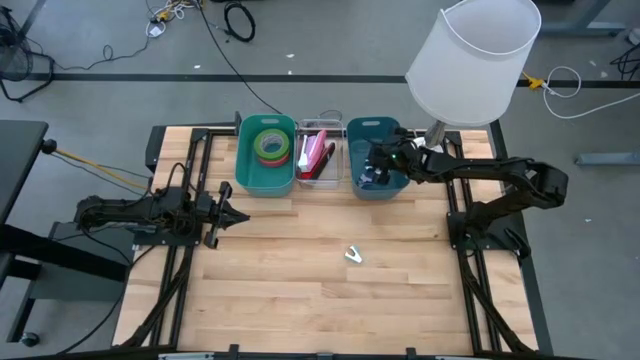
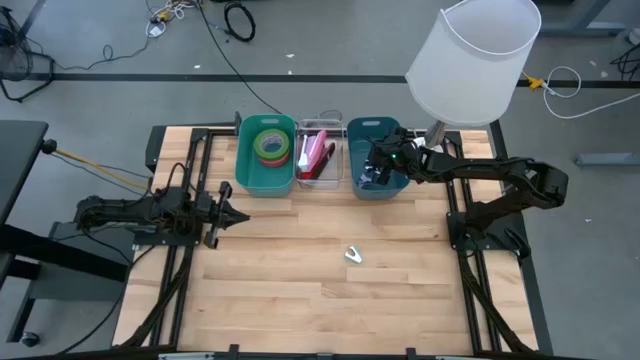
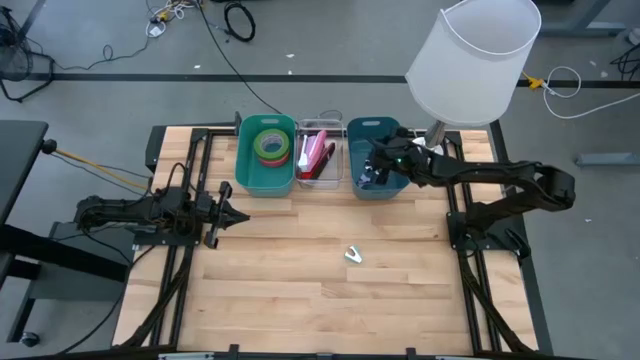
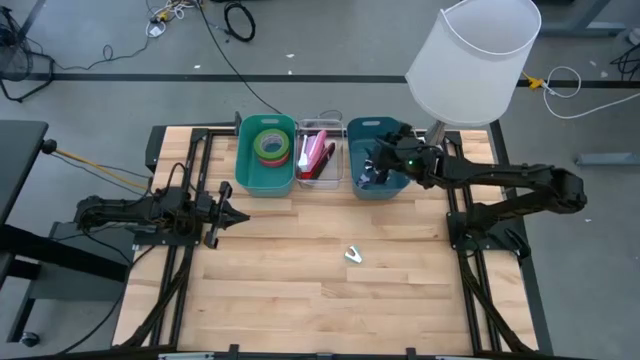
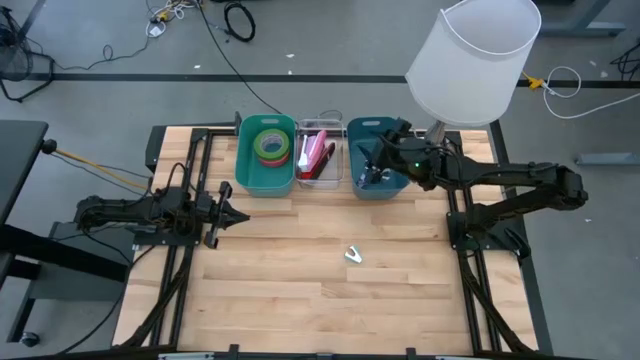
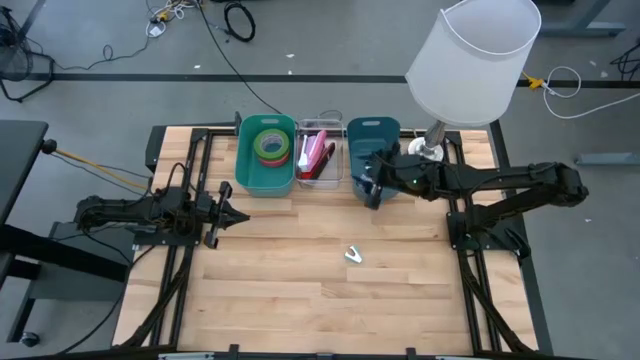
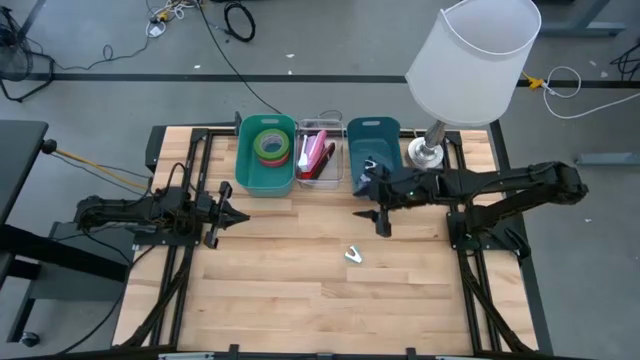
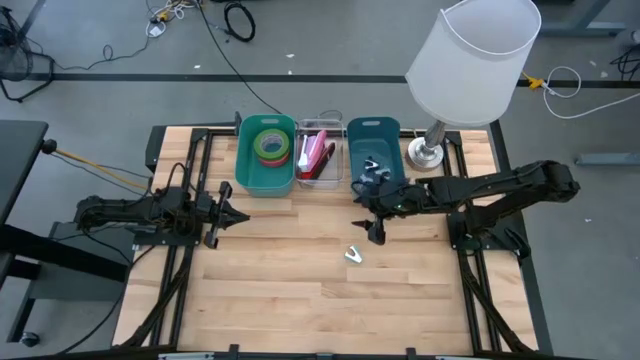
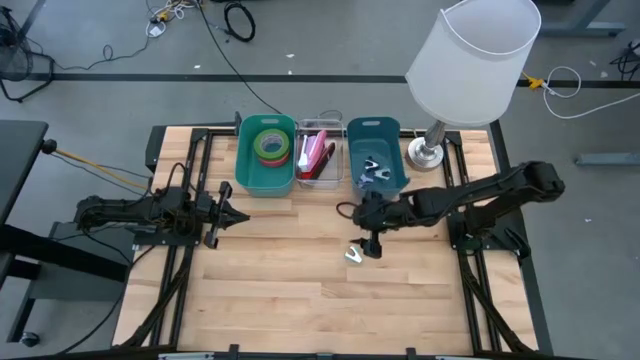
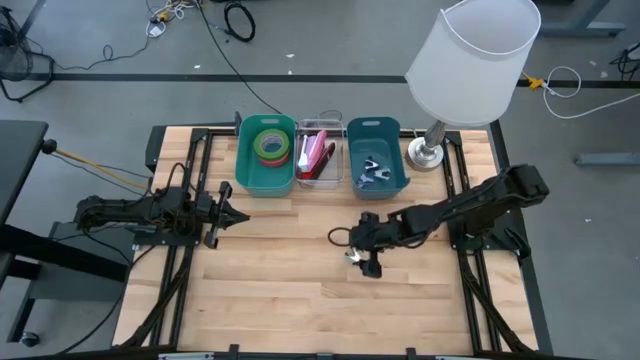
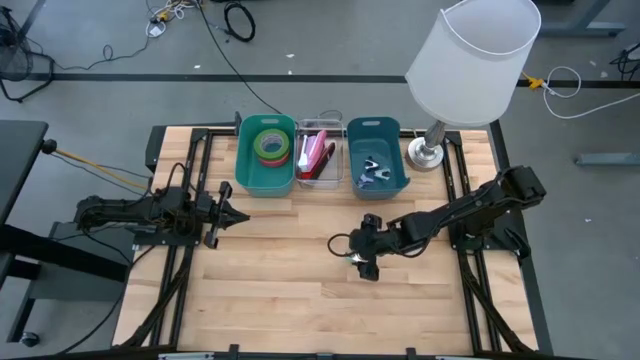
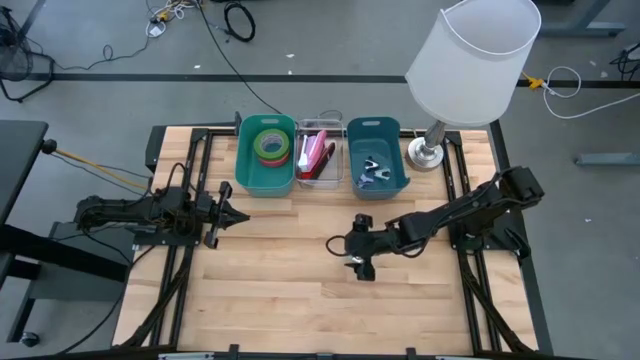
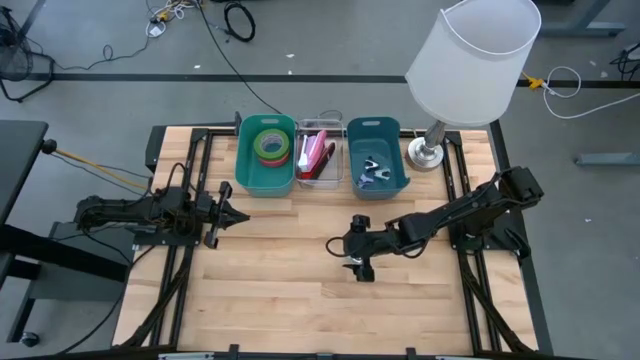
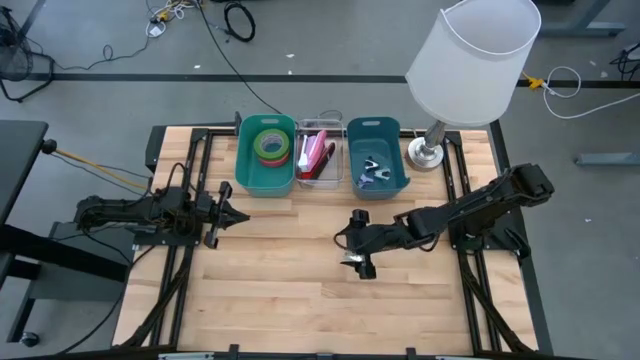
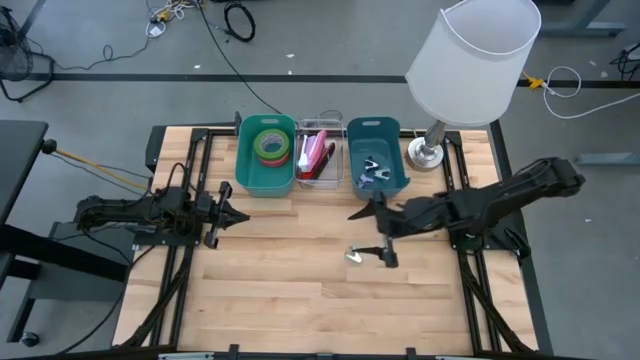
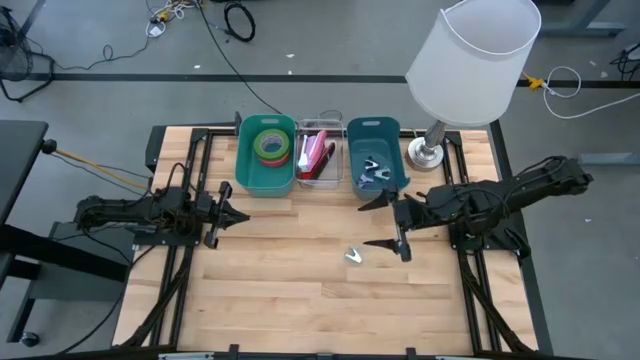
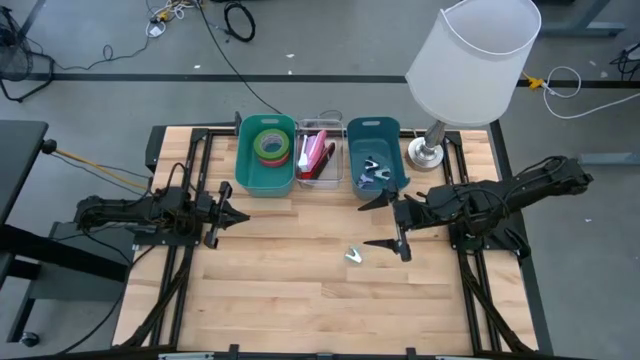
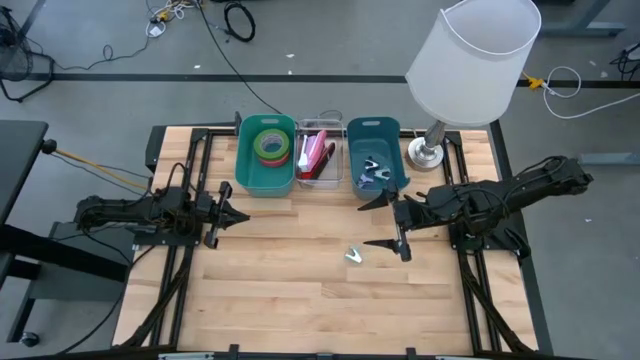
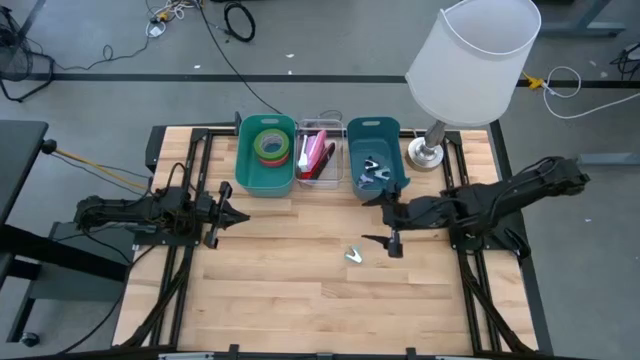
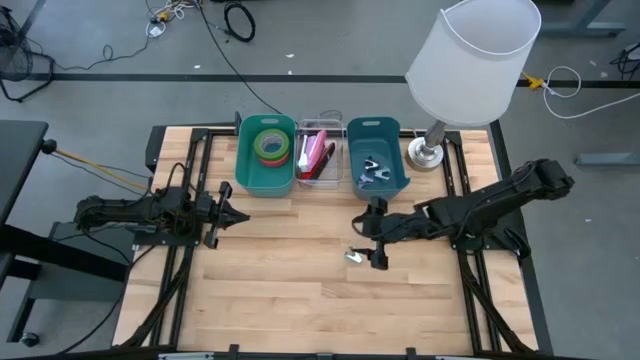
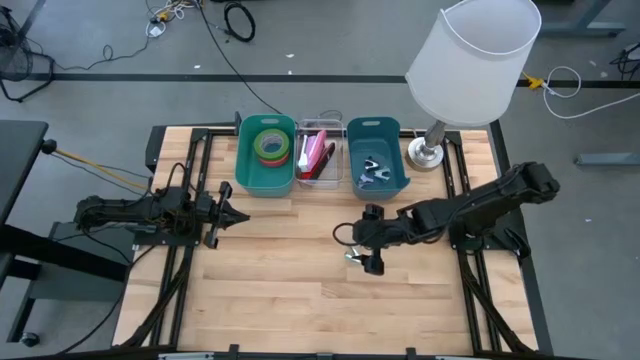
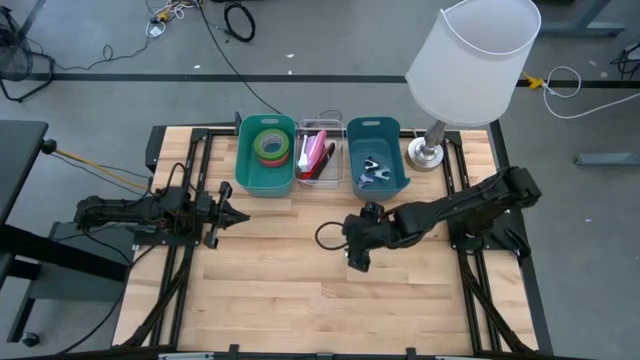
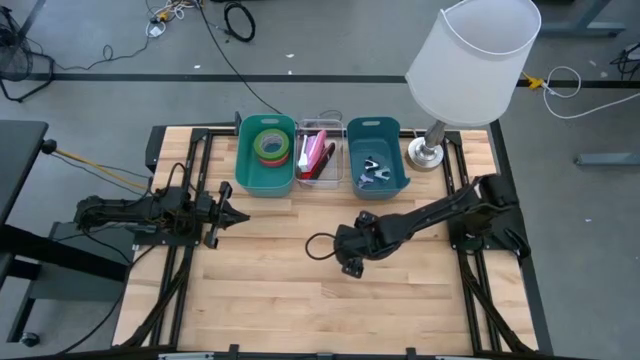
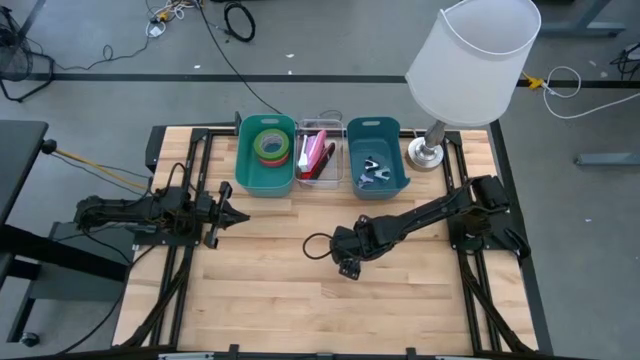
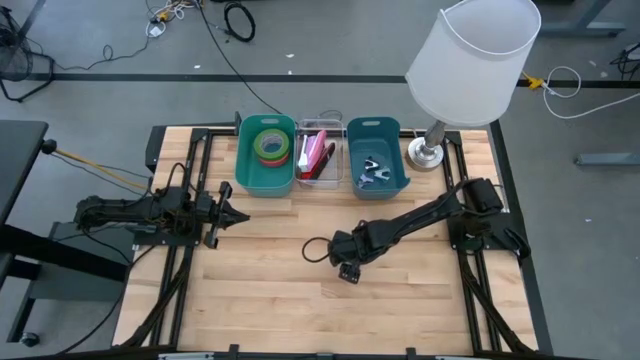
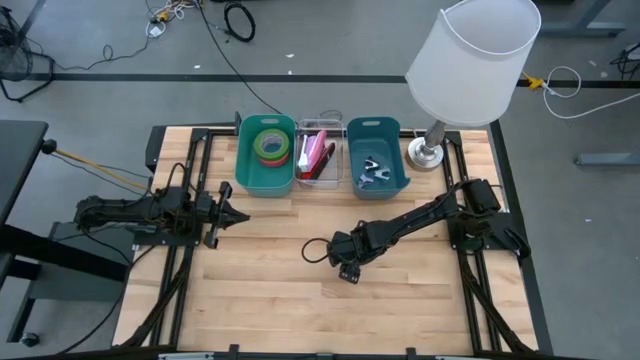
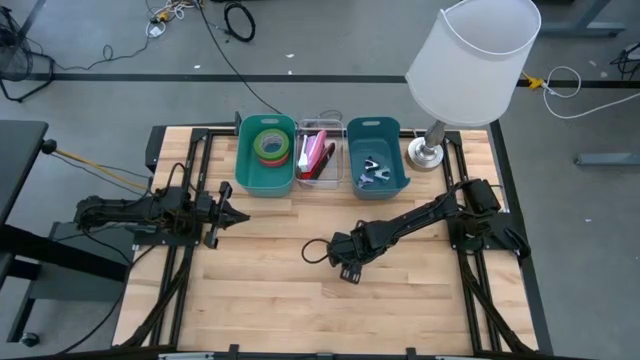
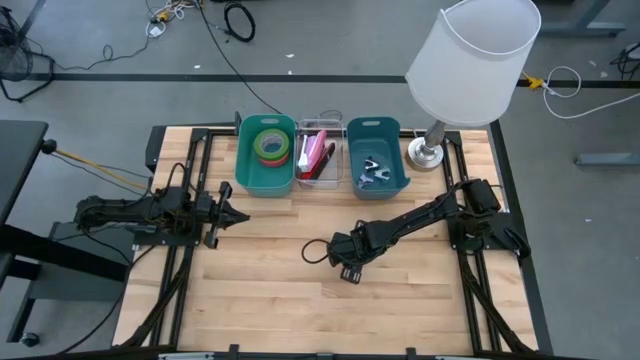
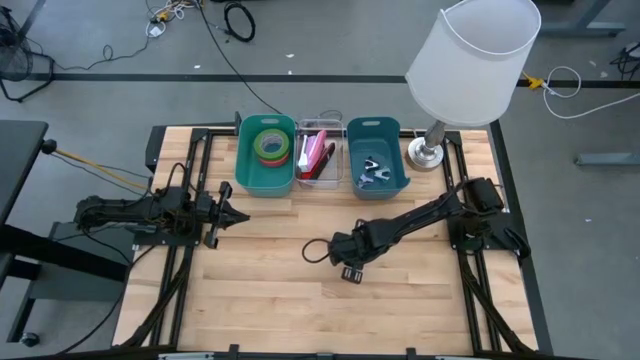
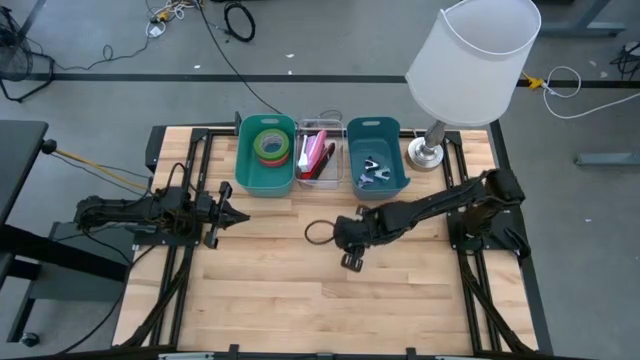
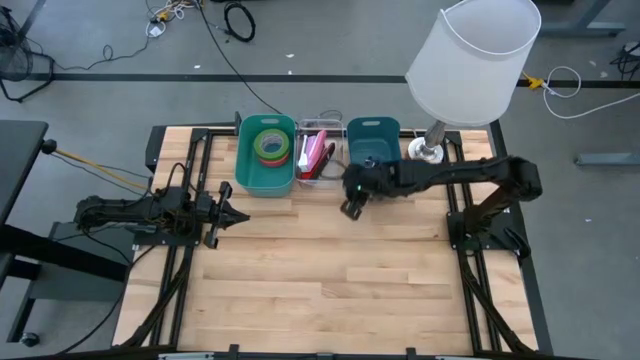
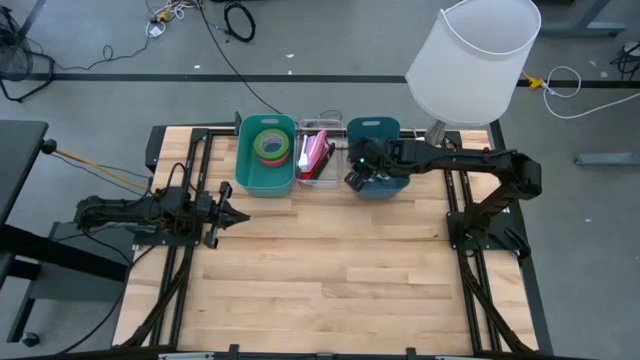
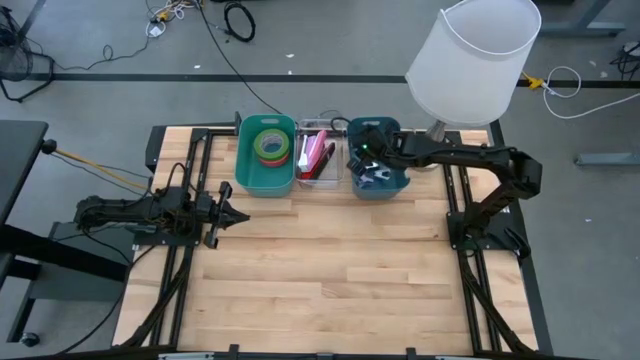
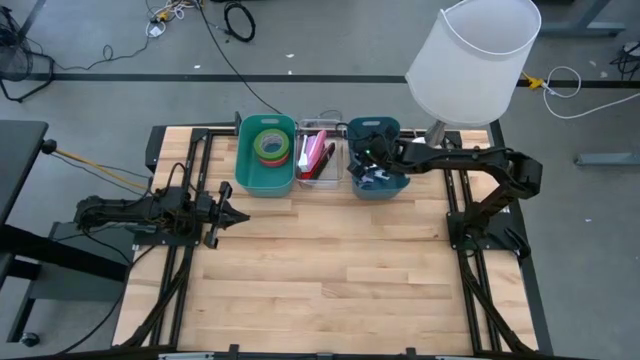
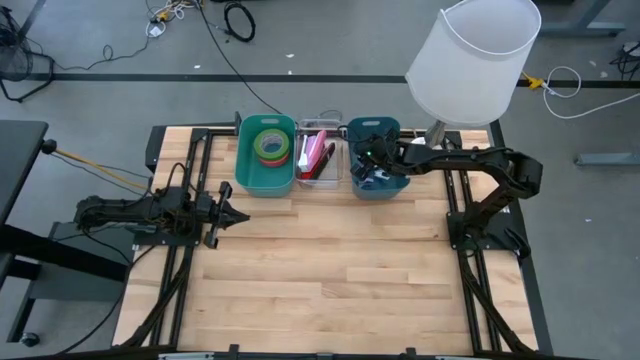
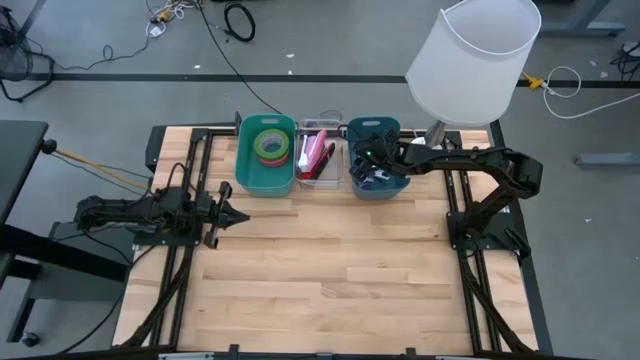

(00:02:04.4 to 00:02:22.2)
Task: Pick and place Stapler, Stapler remover, tape
Put the light green staple remover into the blue bin

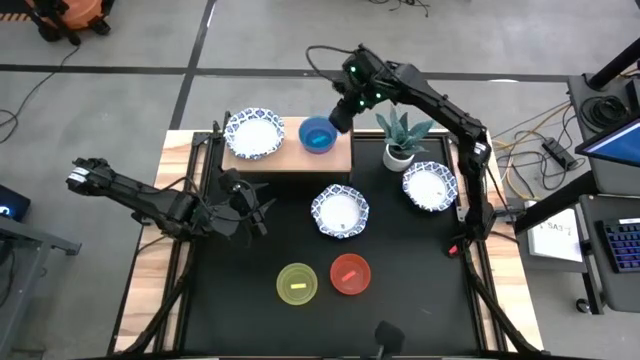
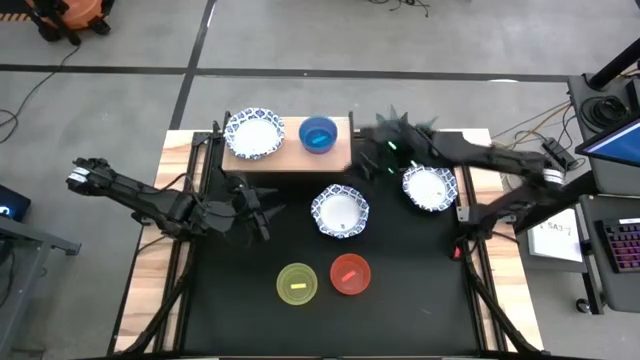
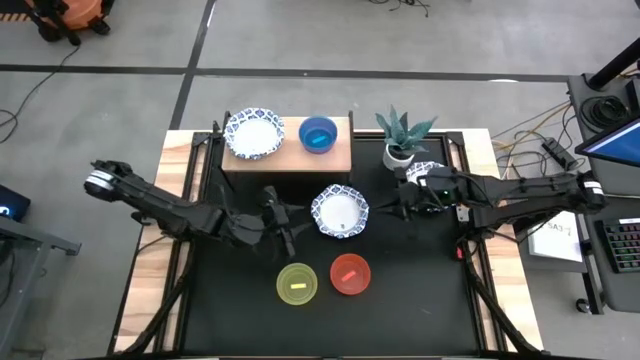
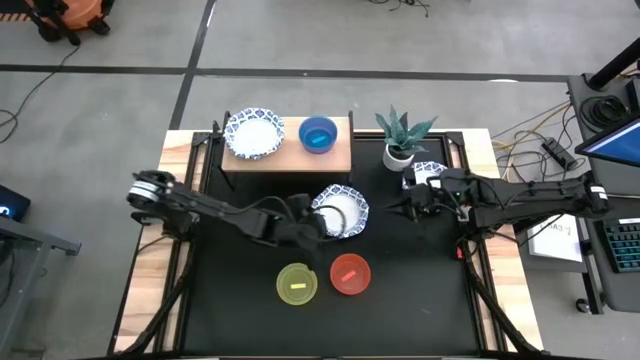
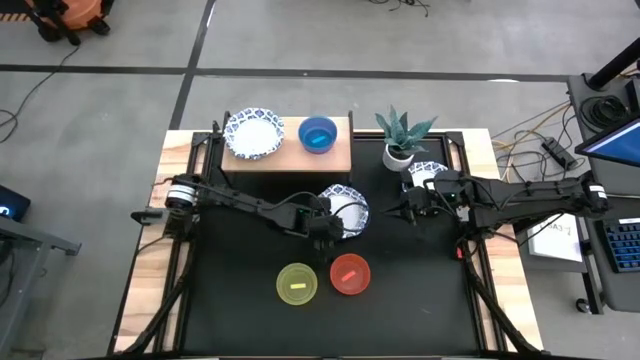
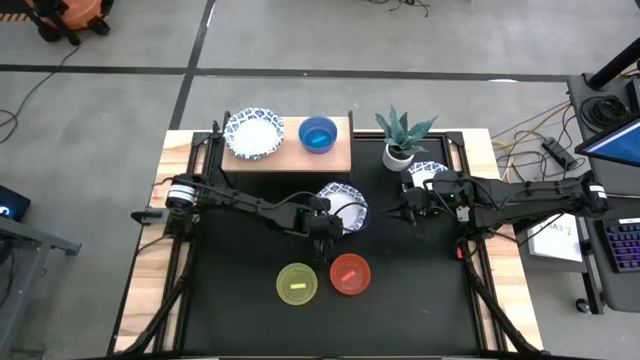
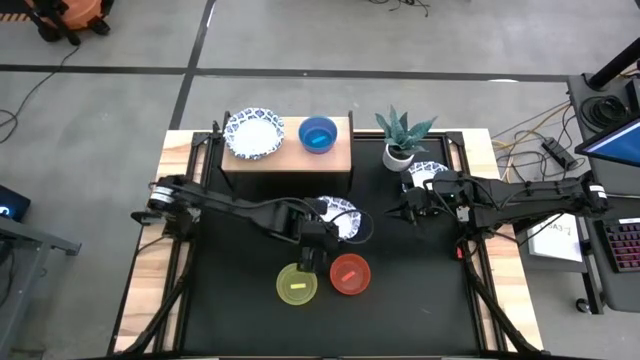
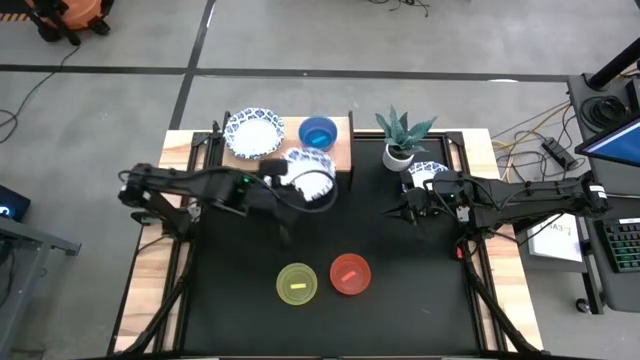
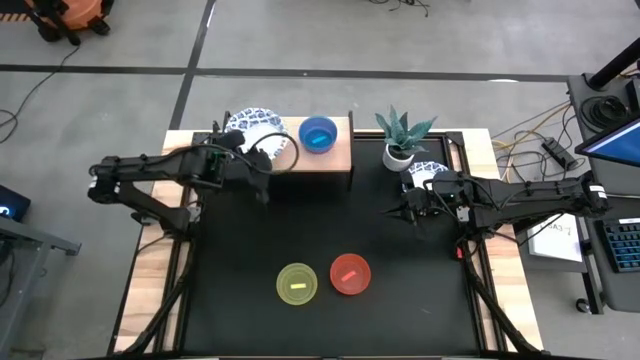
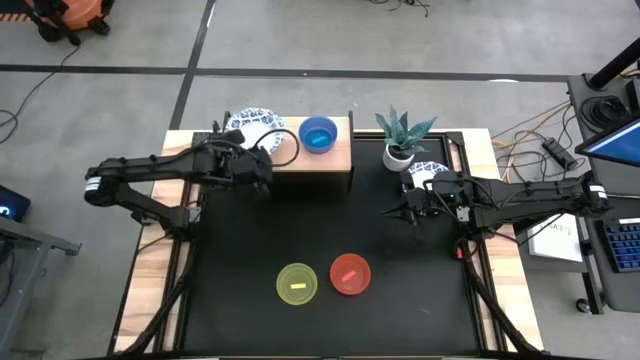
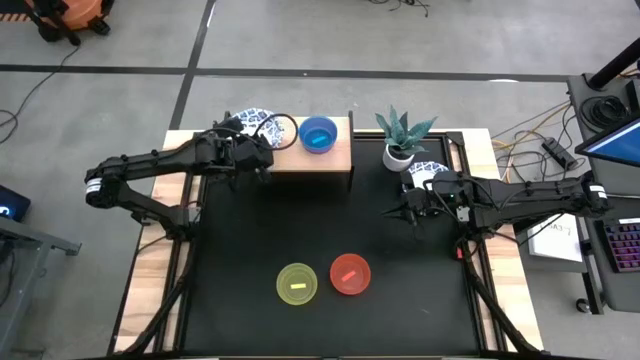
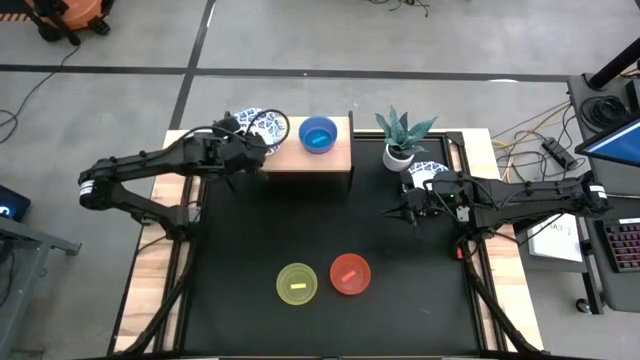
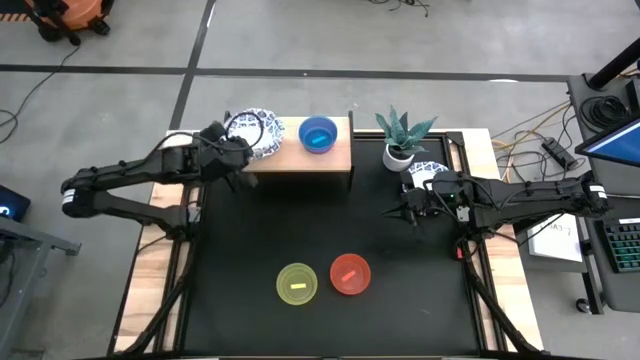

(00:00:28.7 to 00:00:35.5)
Task: Place and stack bowls onto a shelf
Stack the blue patterned bowl on top of the blue patterned bowl on the shelf
